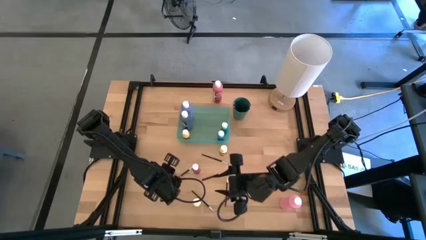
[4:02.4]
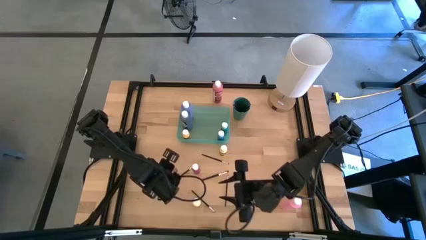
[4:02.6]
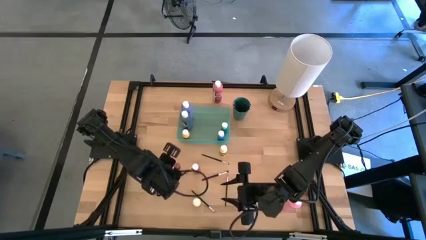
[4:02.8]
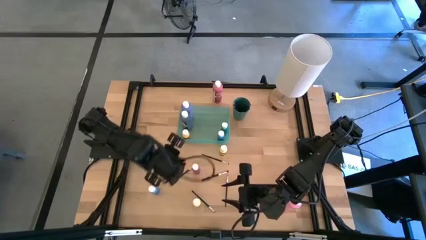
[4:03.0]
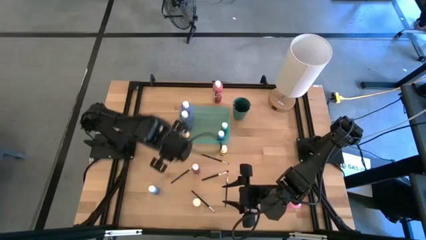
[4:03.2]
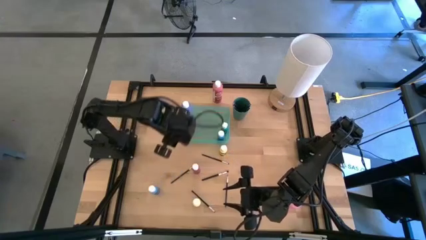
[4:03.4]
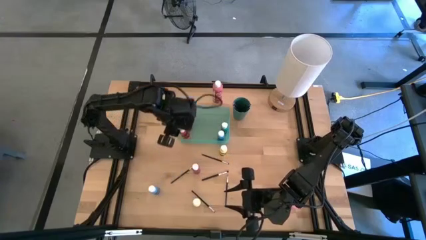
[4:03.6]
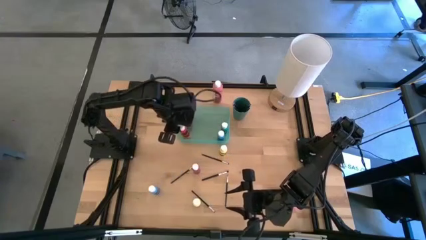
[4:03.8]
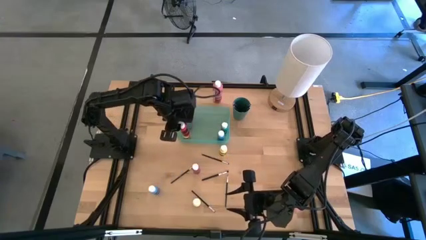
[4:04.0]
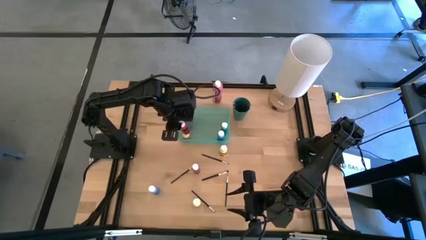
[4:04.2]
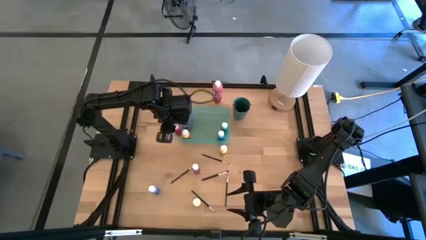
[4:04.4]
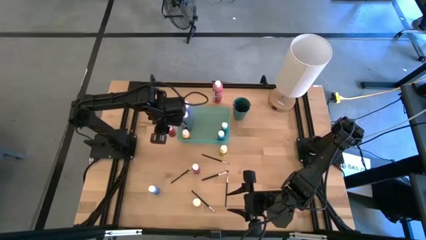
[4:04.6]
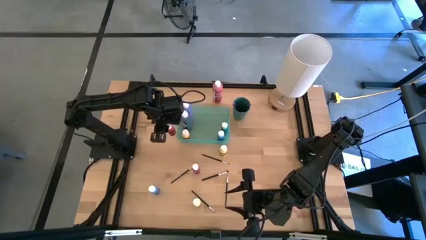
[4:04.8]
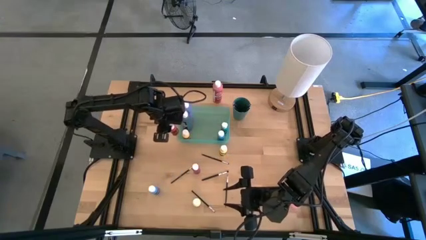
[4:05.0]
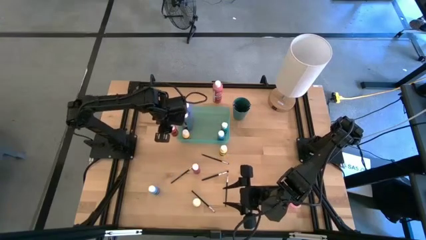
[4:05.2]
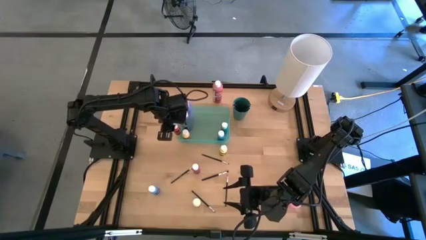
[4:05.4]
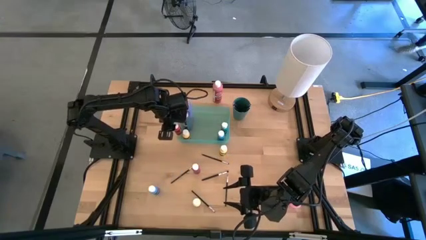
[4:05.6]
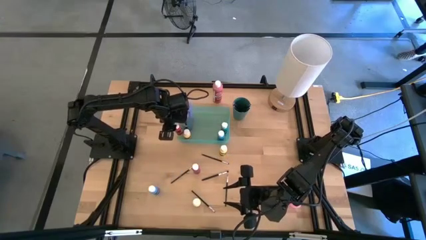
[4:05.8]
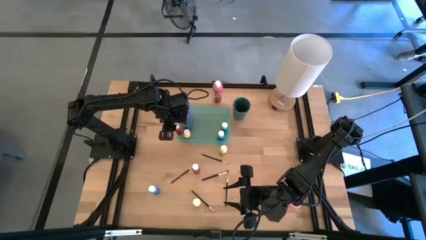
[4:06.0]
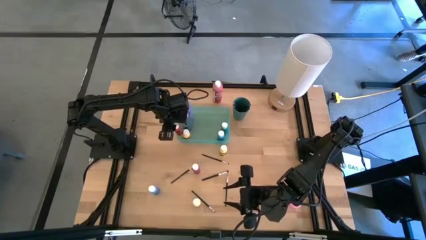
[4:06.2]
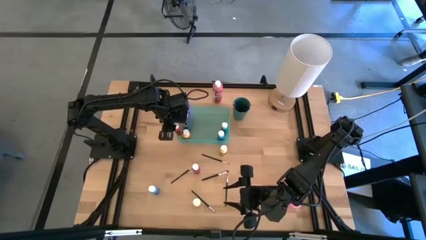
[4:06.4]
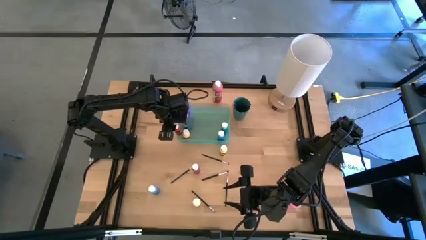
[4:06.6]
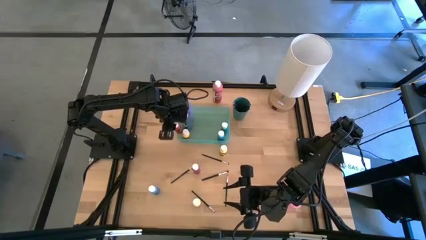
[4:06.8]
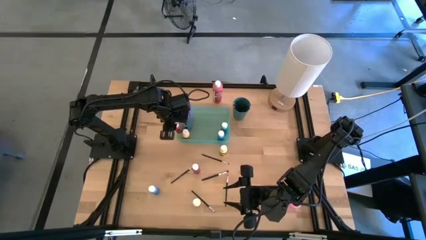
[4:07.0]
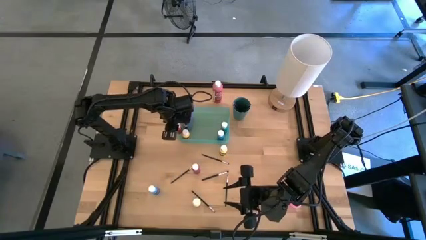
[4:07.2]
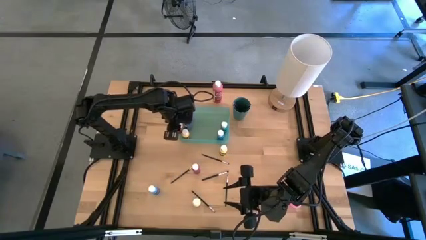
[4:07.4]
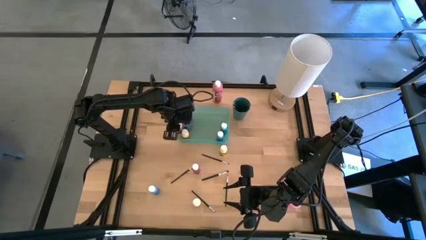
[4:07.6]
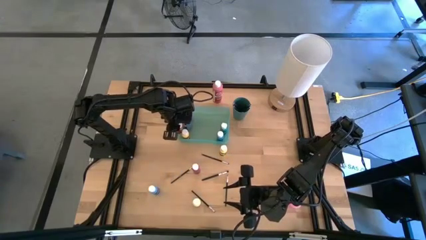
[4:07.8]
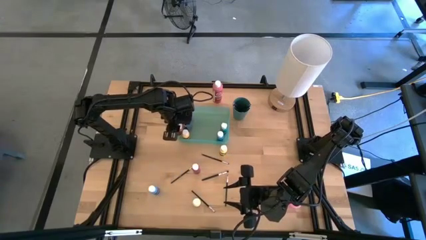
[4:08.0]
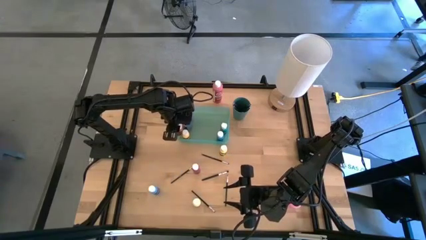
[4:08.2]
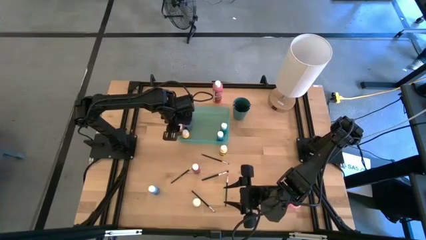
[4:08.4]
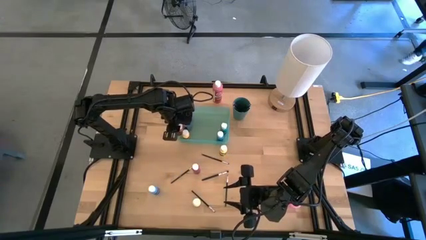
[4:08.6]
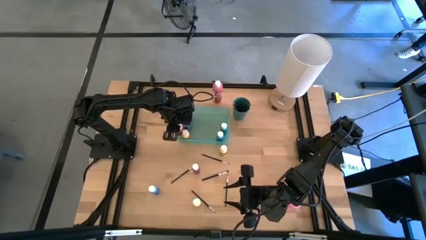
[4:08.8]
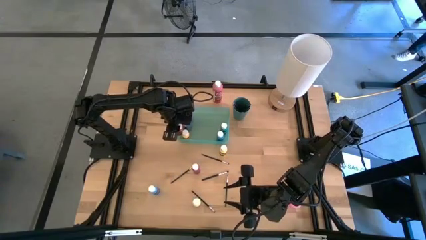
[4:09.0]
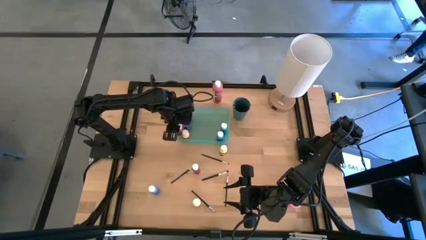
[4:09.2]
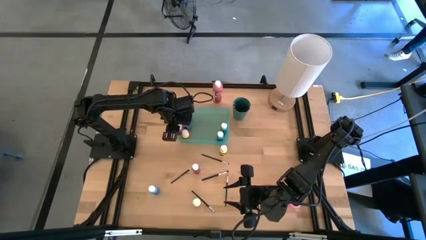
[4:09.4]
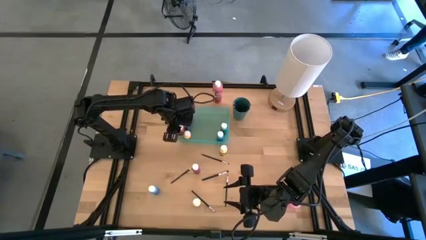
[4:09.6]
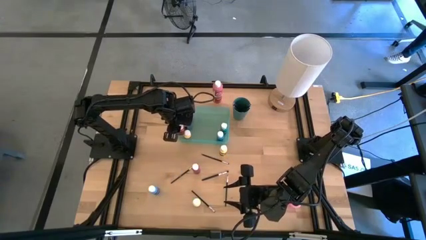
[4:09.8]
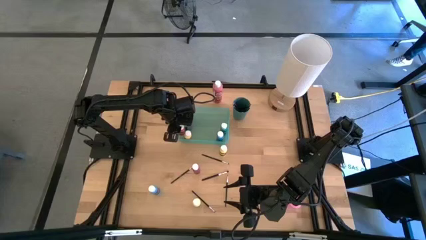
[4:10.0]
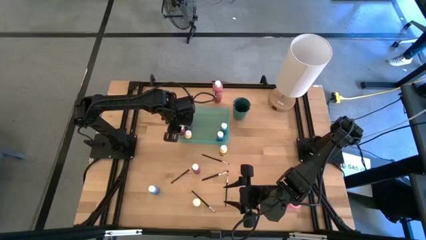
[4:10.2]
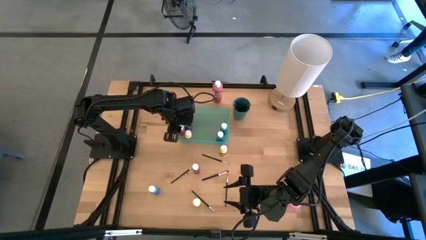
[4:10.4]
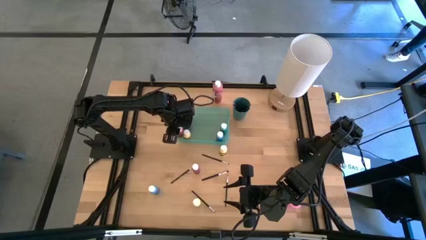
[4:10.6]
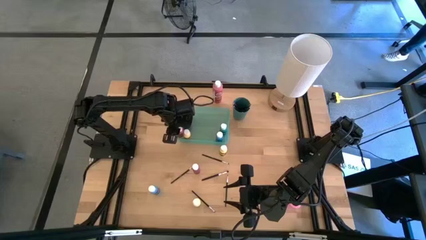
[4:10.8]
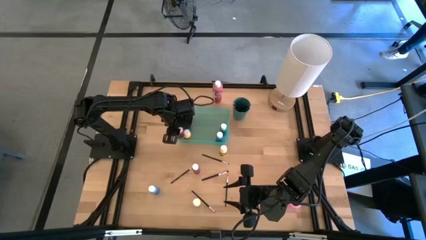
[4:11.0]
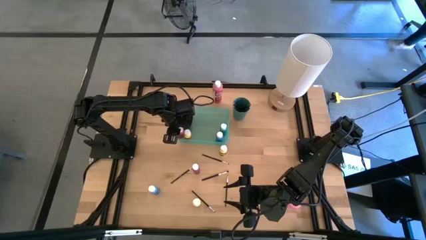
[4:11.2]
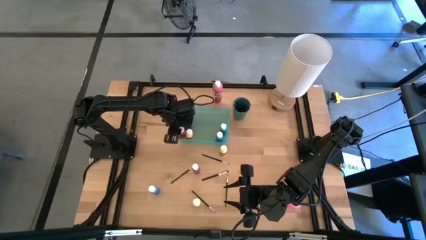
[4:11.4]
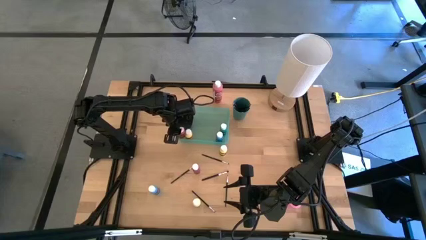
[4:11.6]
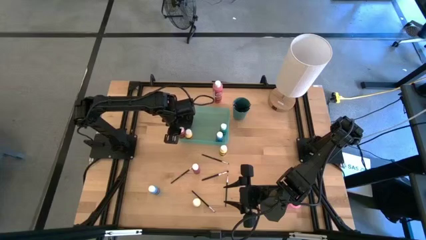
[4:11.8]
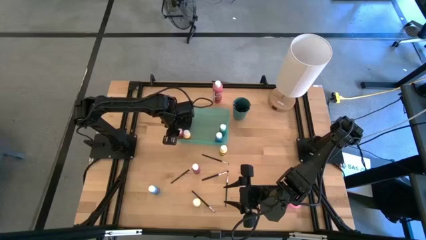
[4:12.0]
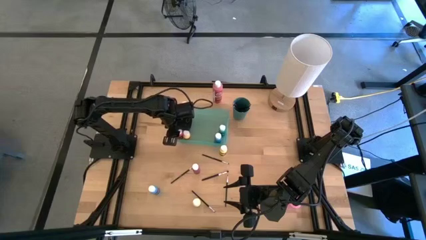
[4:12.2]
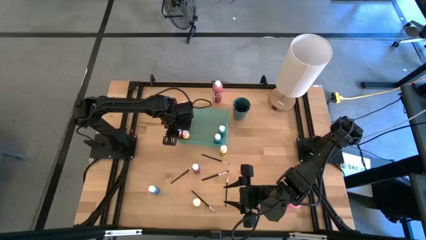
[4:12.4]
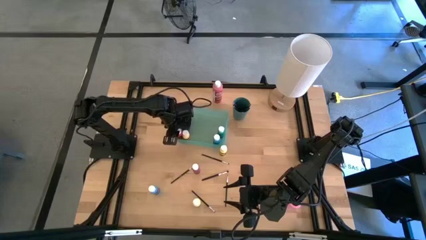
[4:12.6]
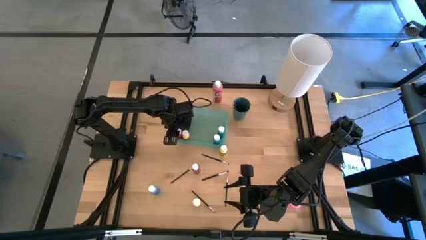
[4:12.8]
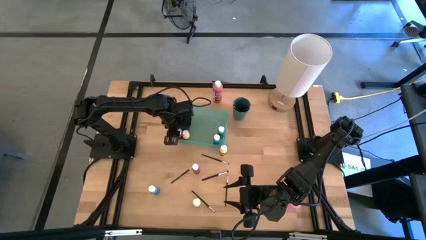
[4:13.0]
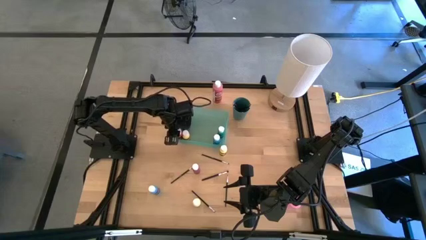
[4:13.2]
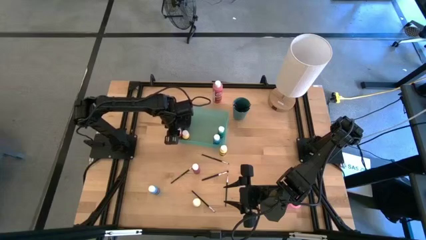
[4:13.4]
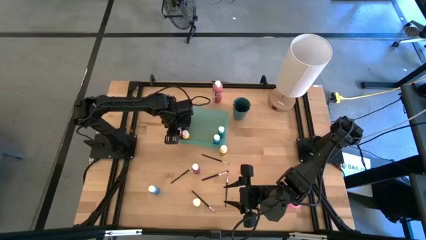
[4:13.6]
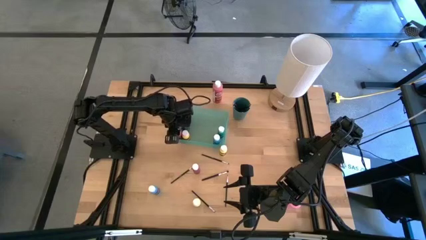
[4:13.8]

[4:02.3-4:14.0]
Task: Pick & Place Paint Supplies
Put the small red paint bottle into the green bin
